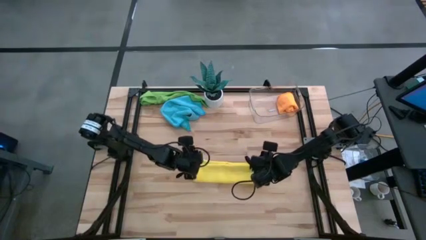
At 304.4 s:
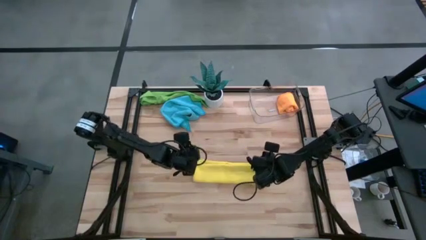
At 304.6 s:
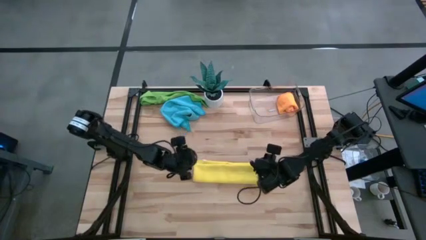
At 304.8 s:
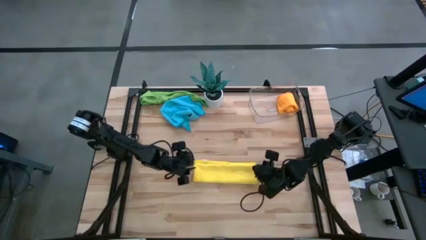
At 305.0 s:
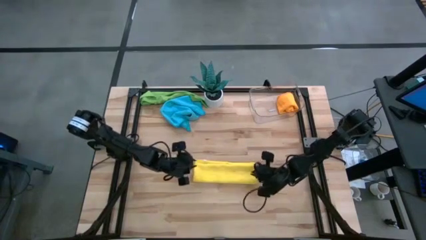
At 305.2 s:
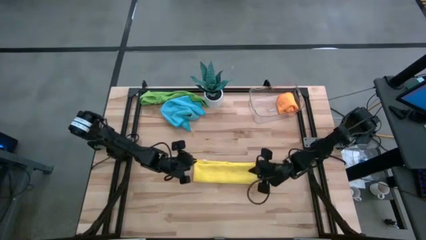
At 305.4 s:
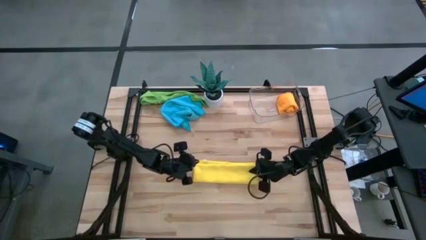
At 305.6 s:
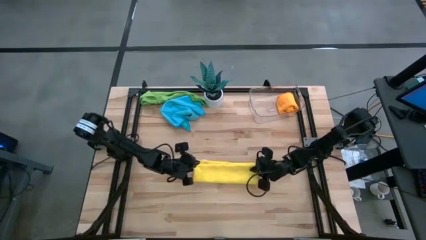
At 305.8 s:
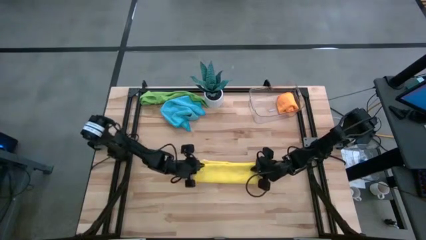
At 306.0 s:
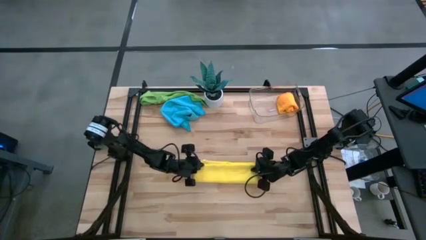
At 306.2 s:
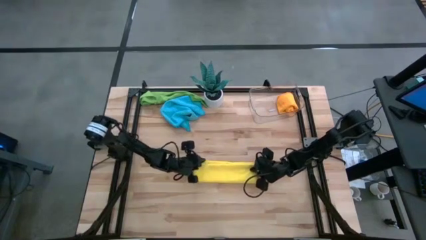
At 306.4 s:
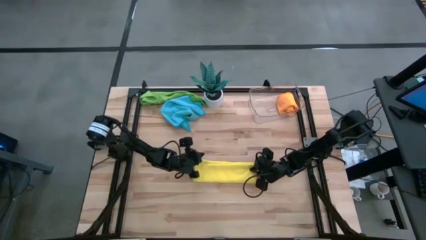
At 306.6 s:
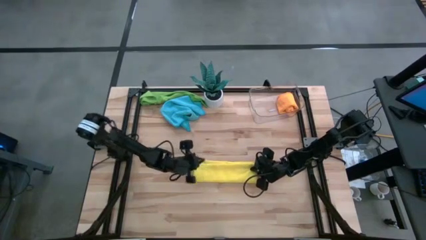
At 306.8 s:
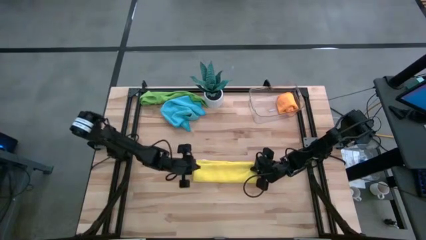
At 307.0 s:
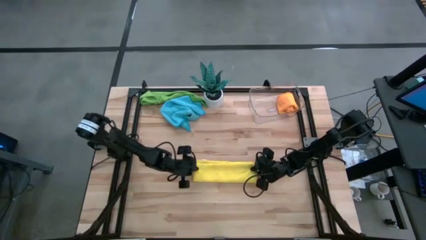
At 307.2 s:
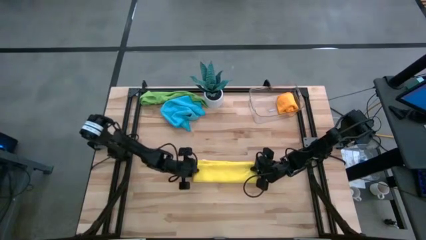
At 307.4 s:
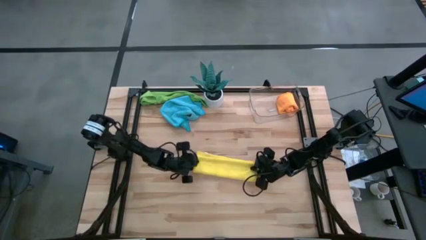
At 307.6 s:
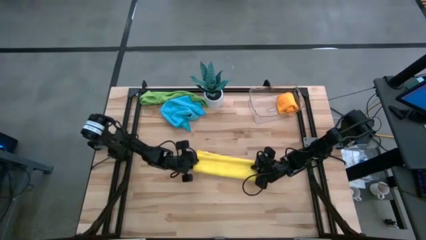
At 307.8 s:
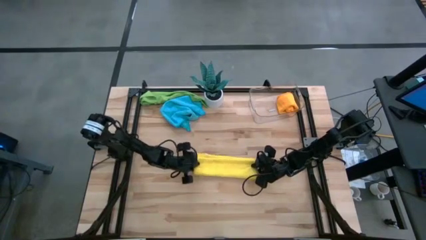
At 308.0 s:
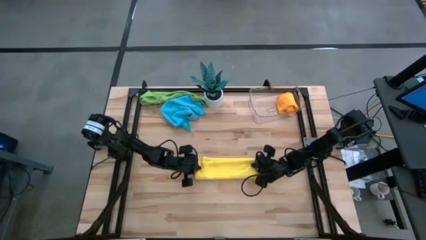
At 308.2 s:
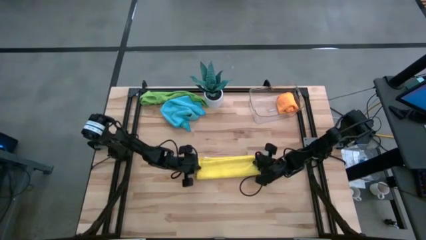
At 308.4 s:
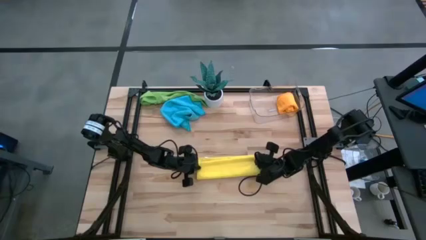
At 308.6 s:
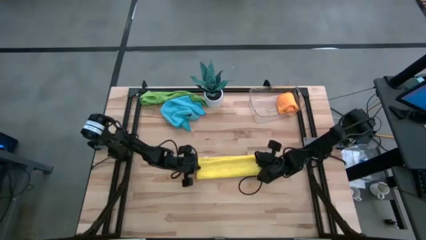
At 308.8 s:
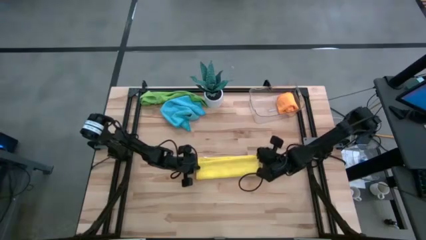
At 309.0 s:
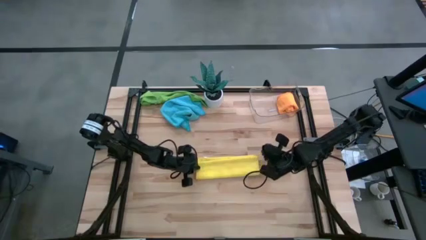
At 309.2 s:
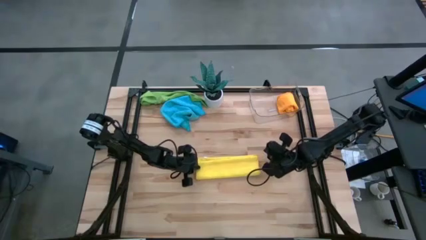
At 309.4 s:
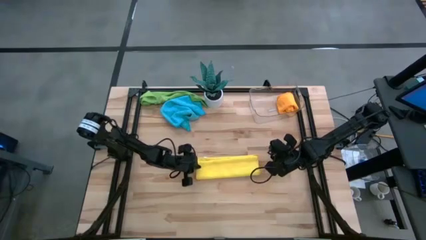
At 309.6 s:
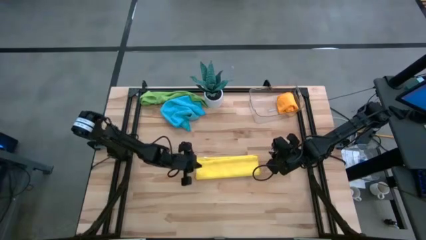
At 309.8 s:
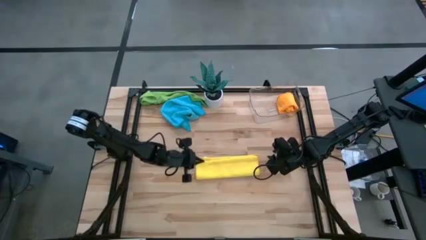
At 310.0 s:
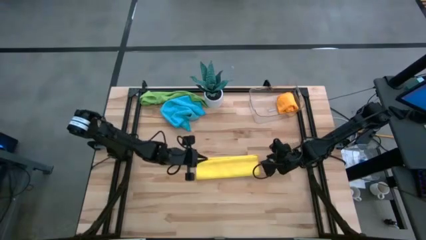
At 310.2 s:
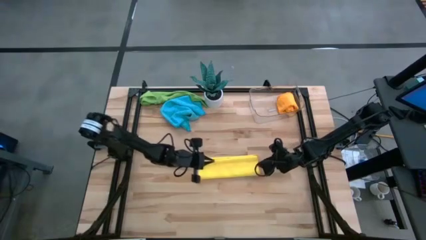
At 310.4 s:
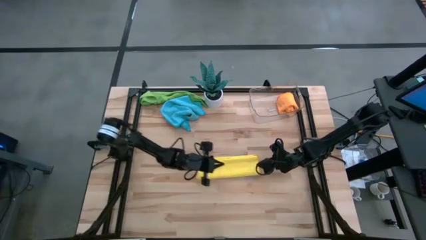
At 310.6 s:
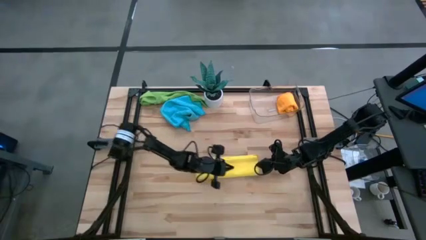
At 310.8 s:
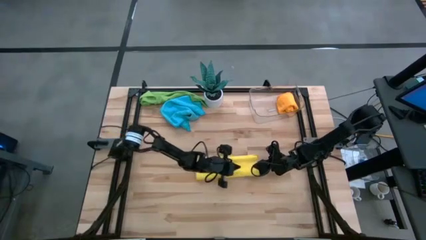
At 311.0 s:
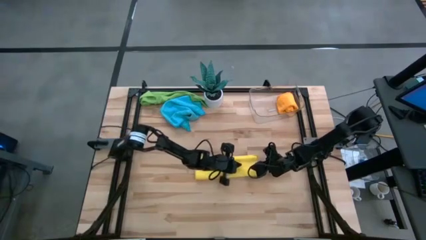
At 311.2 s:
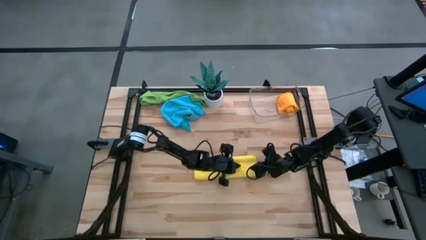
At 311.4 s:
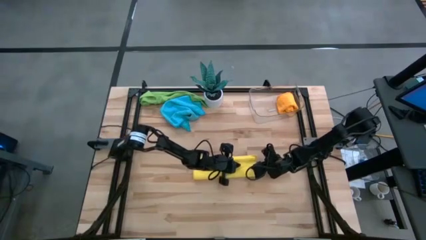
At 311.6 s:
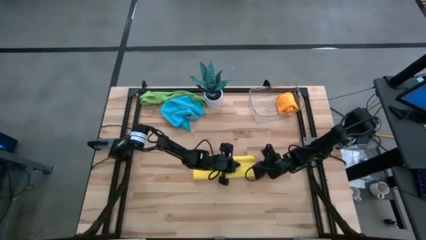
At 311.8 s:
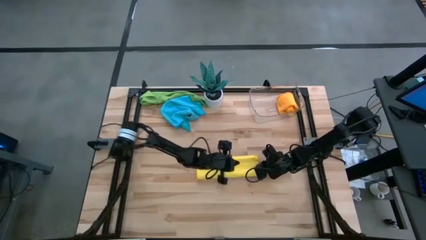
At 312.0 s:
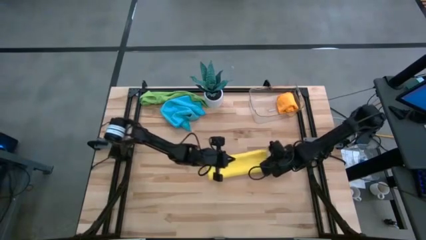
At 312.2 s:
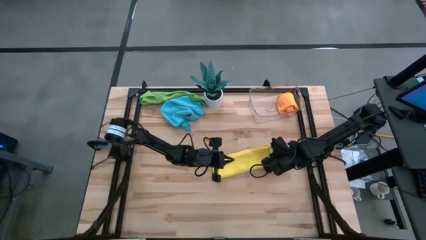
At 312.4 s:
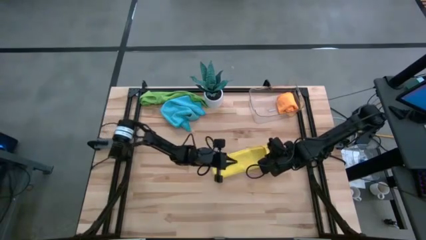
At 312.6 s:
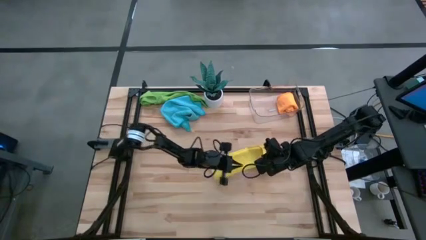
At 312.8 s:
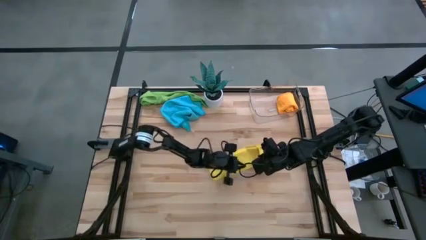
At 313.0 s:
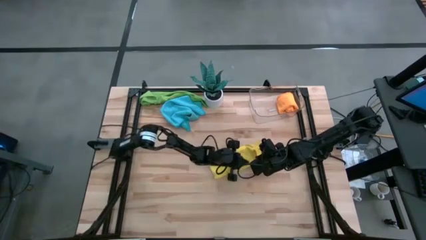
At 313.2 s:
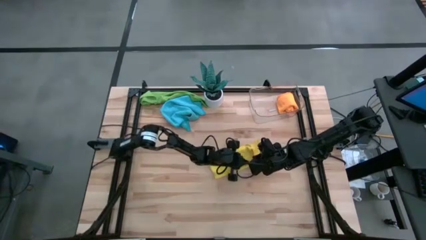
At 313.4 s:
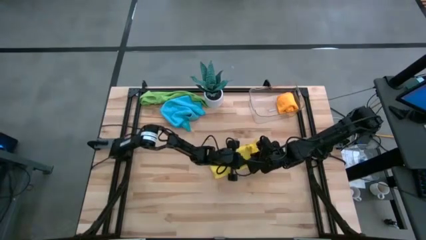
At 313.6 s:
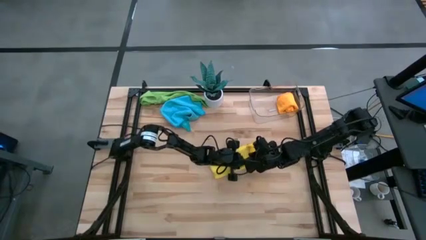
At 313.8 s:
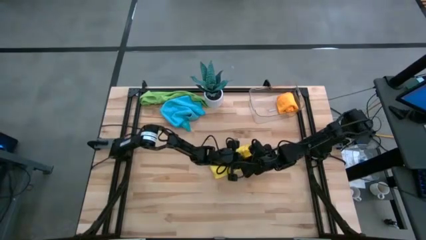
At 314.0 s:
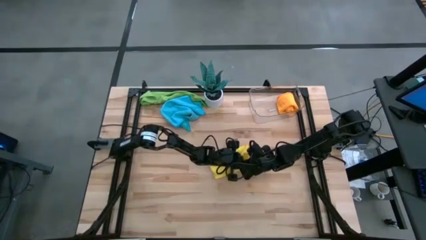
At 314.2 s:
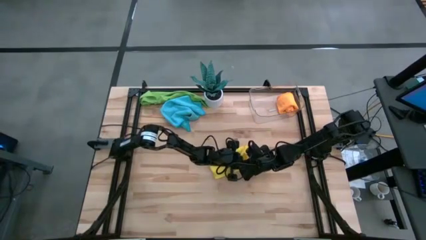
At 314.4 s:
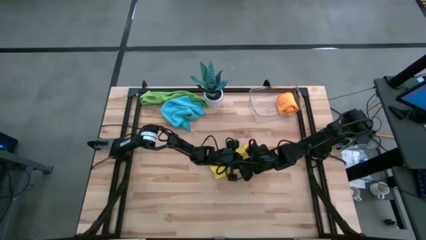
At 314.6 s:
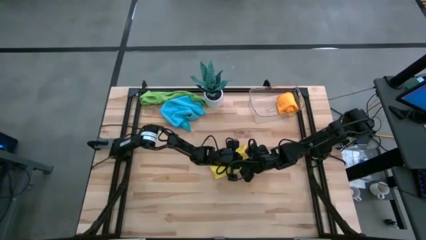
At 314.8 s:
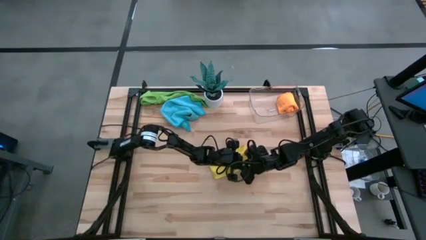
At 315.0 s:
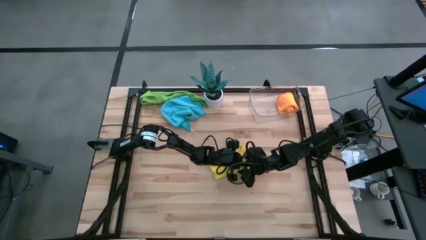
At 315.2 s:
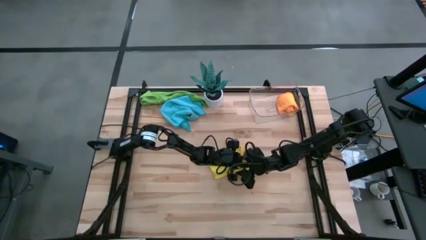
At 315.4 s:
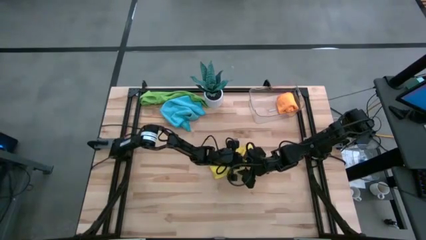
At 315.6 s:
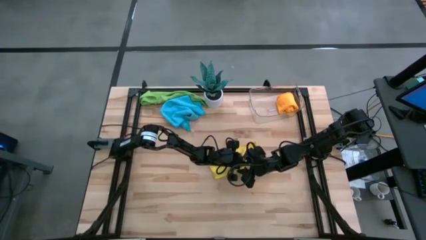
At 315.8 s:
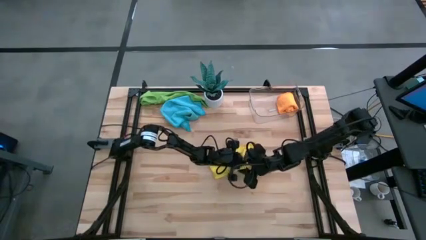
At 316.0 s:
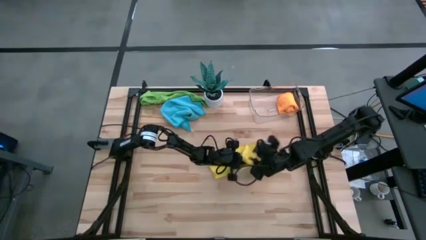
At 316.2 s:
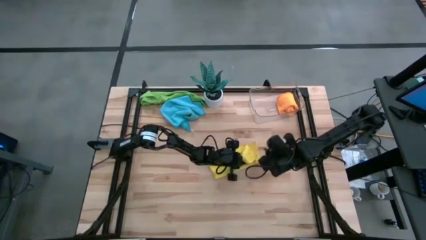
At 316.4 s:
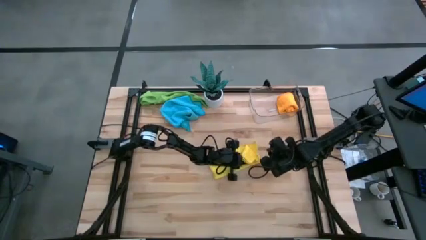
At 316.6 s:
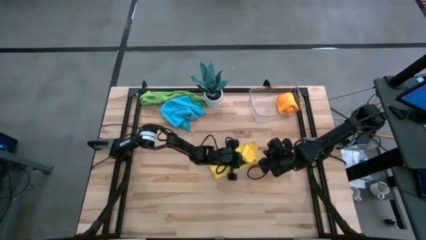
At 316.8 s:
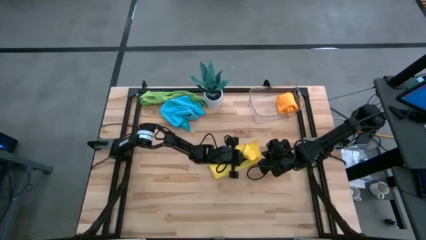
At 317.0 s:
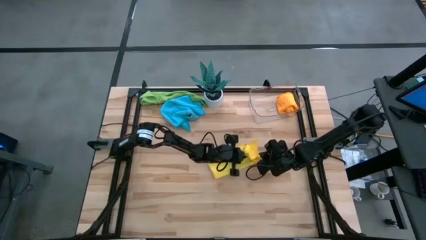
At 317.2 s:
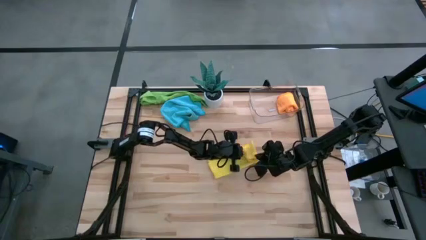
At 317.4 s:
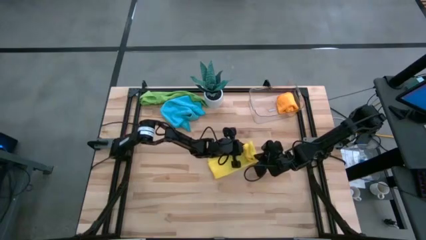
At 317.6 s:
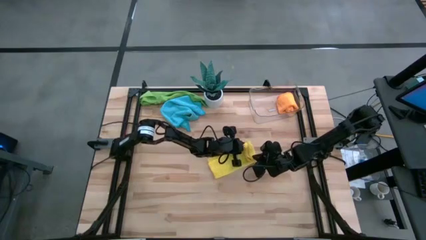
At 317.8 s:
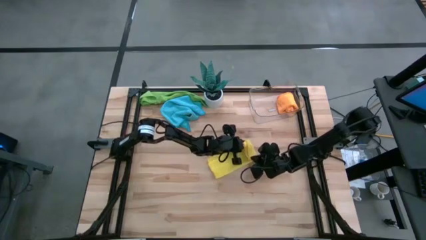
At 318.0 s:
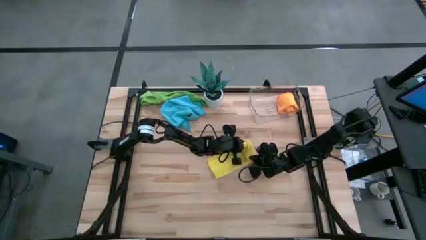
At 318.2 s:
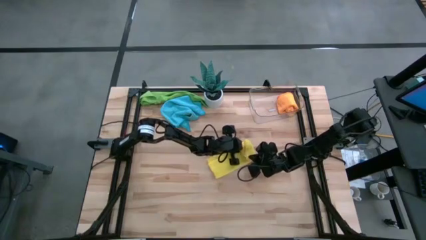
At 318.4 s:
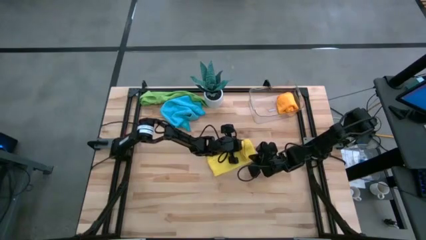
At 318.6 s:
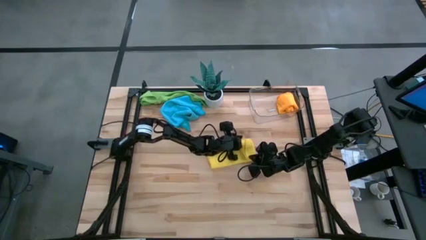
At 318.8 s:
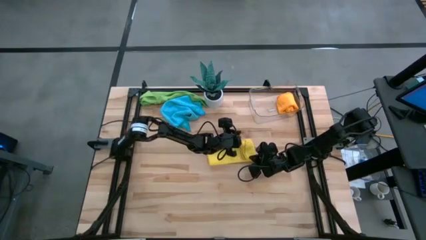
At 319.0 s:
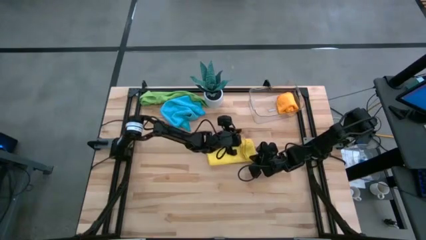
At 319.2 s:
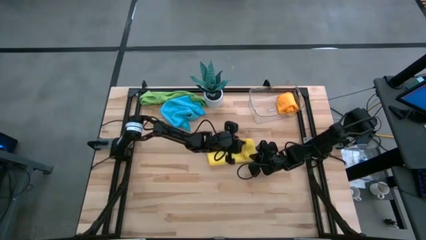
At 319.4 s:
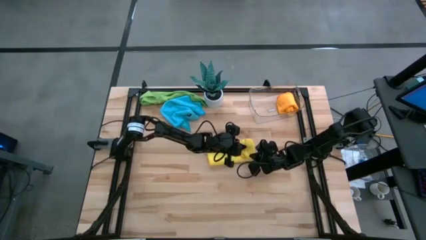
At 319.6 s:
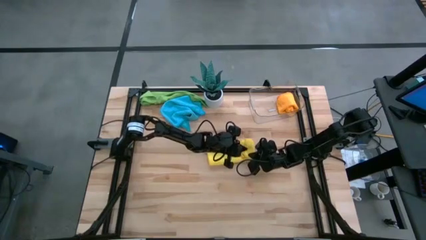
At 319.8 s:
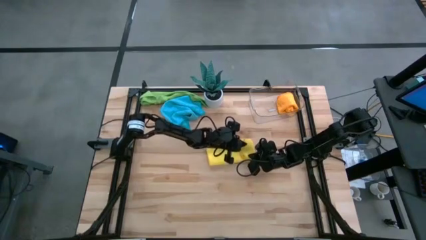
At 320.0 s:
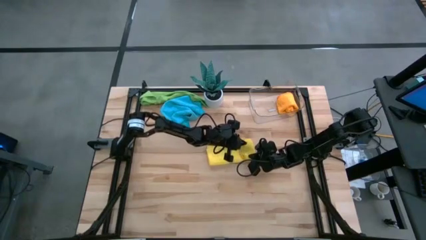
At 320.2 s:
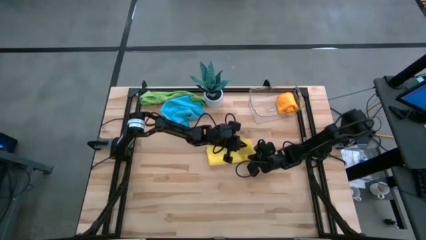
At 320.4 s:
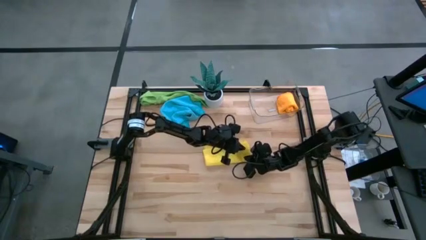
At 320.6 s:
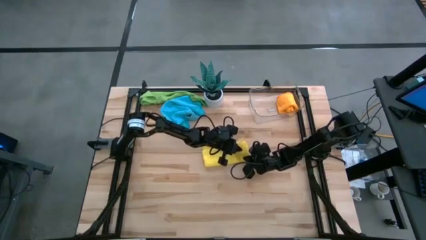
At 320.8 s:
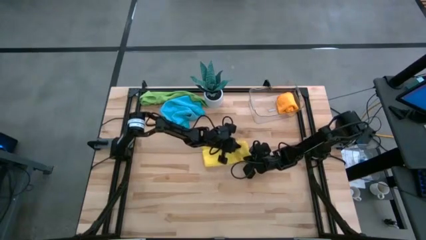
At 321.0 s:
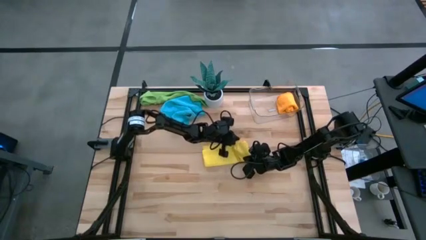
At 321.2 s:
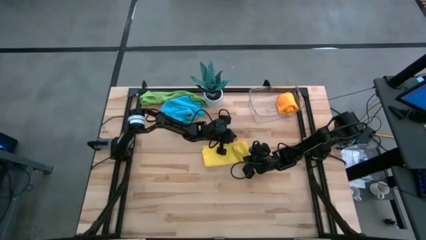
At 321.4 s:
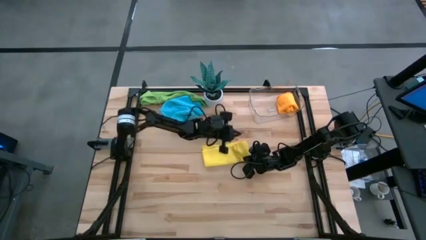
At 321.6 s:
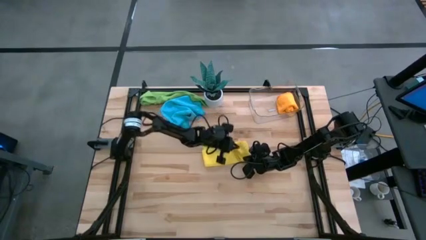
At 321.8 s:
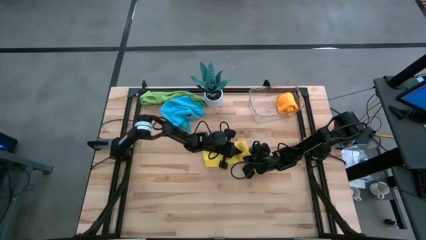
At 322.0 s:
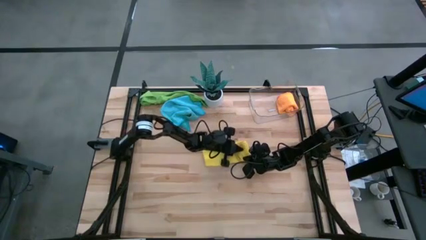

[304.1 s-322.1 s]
Task: Roll microfiber towels into tight, uniform cylinder then place into a basket
Roll the yellow microfiber cloth
